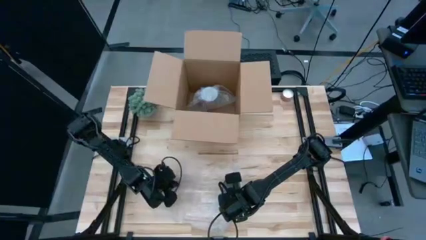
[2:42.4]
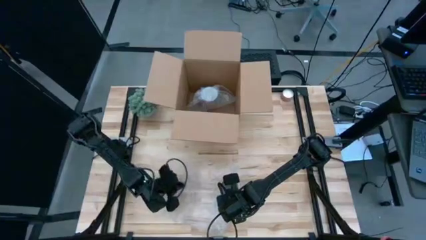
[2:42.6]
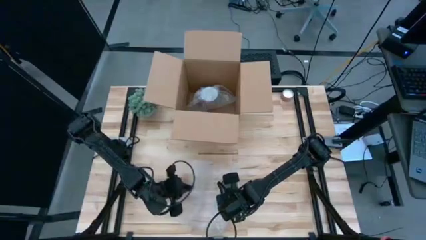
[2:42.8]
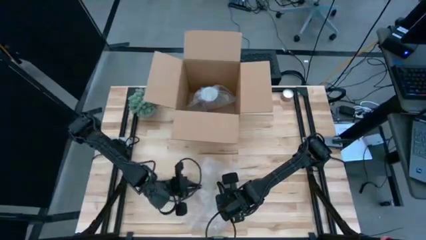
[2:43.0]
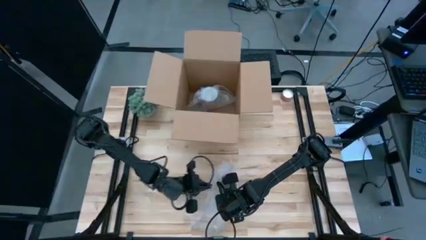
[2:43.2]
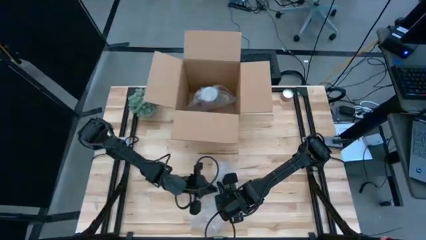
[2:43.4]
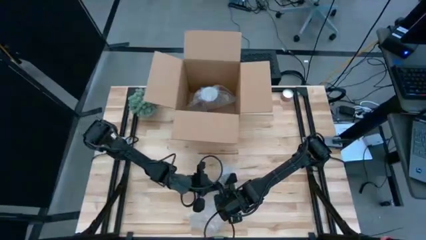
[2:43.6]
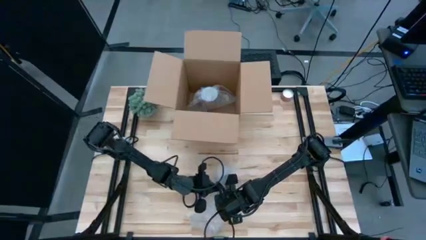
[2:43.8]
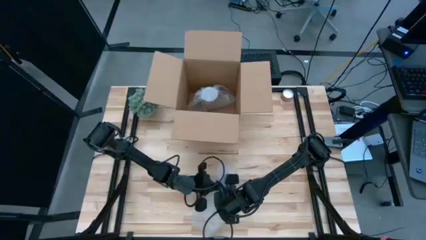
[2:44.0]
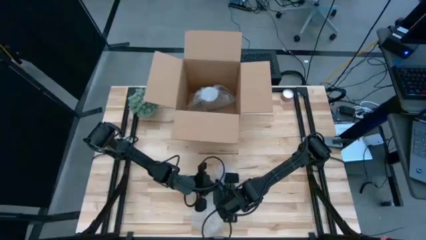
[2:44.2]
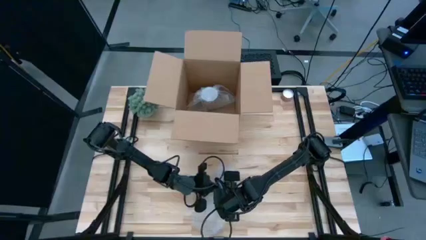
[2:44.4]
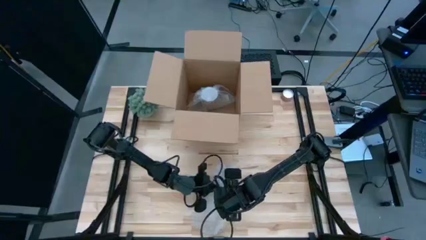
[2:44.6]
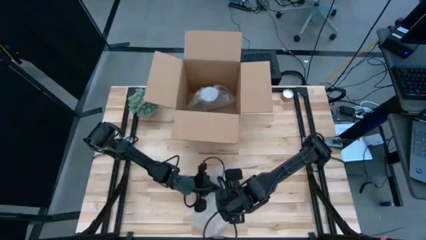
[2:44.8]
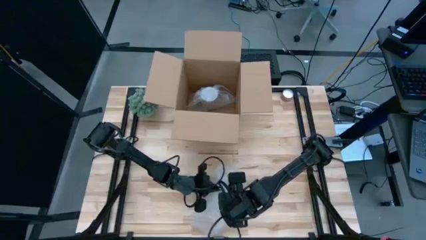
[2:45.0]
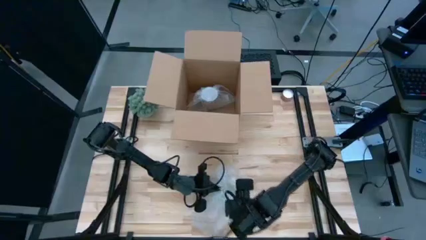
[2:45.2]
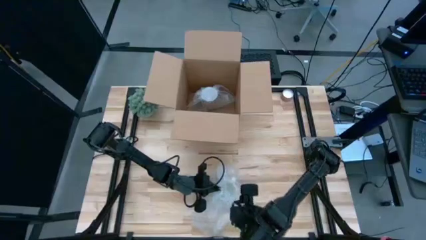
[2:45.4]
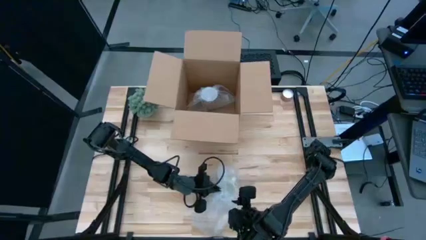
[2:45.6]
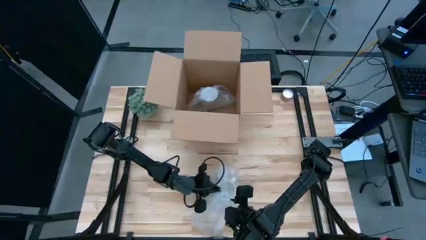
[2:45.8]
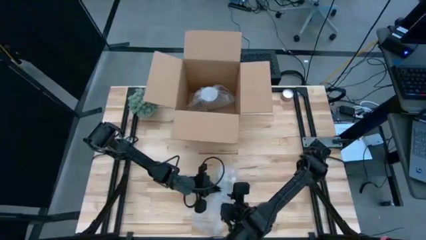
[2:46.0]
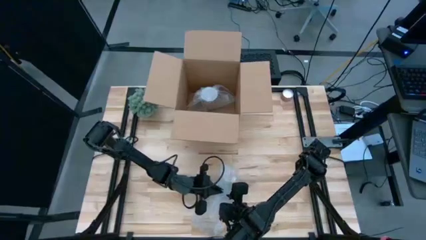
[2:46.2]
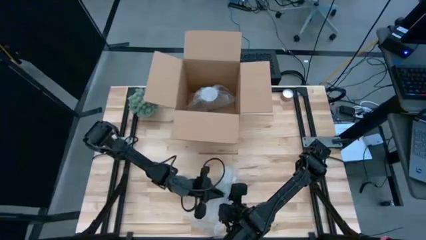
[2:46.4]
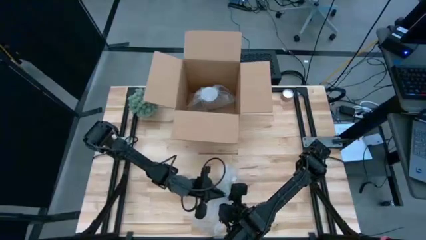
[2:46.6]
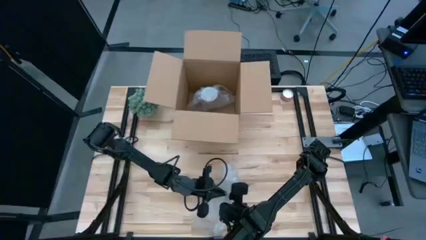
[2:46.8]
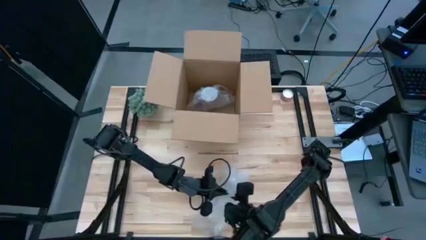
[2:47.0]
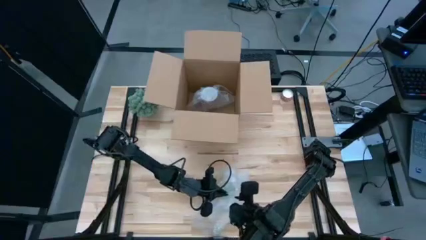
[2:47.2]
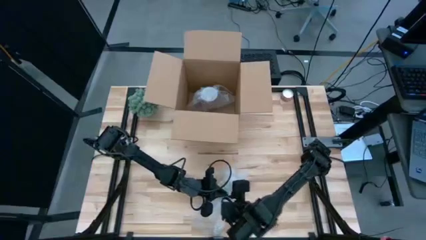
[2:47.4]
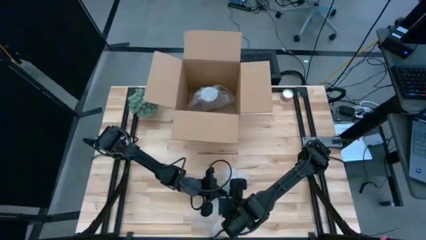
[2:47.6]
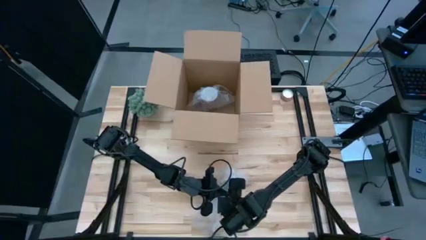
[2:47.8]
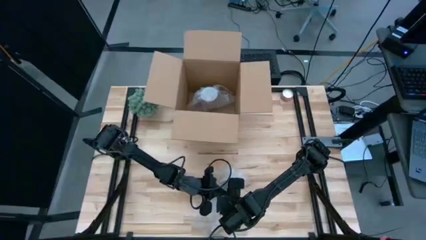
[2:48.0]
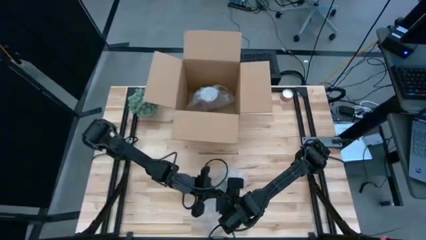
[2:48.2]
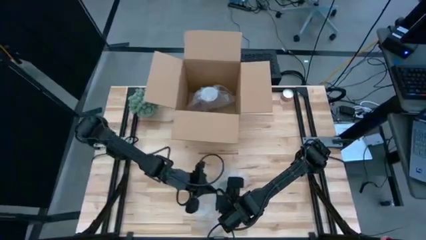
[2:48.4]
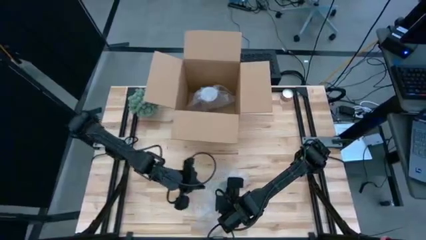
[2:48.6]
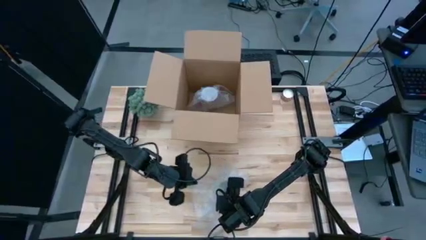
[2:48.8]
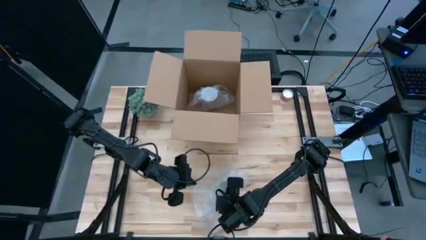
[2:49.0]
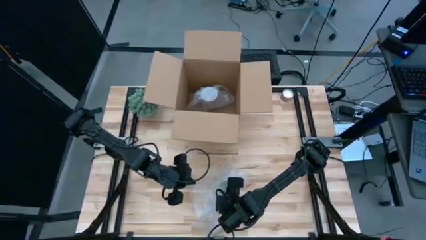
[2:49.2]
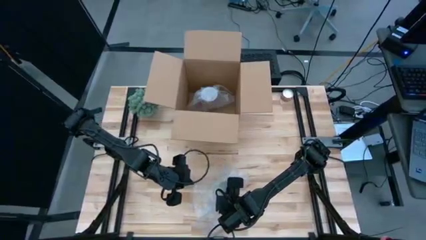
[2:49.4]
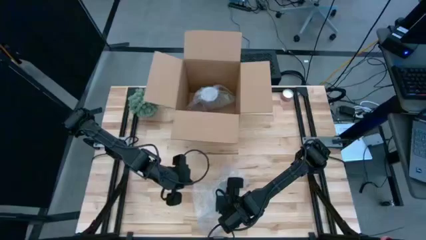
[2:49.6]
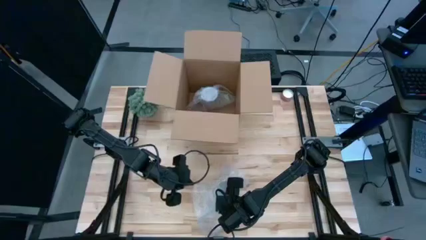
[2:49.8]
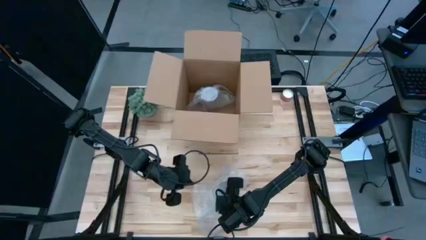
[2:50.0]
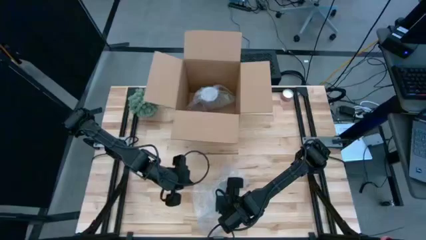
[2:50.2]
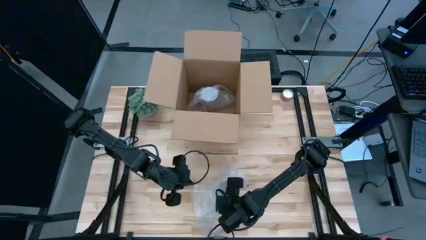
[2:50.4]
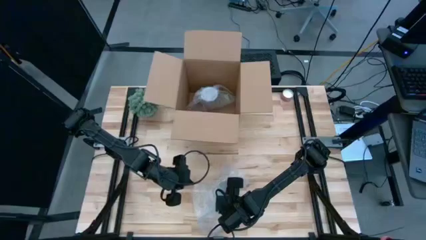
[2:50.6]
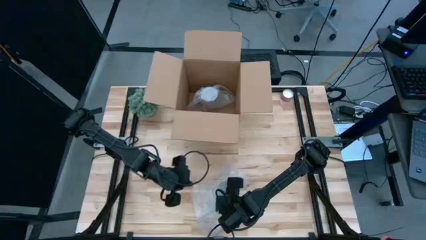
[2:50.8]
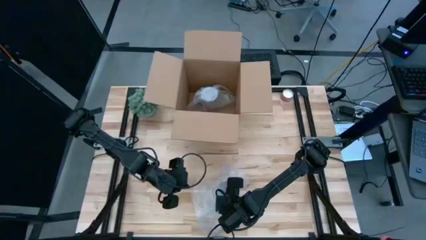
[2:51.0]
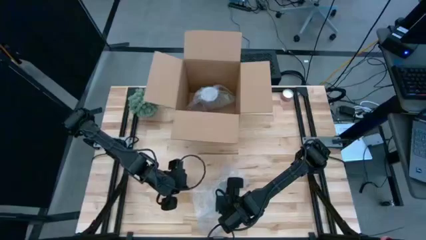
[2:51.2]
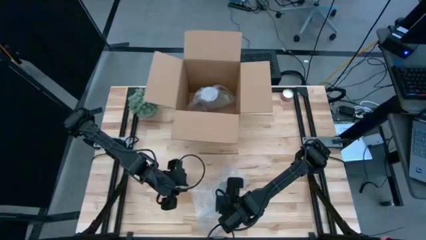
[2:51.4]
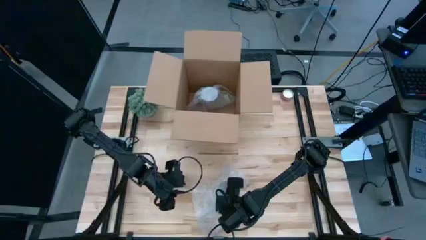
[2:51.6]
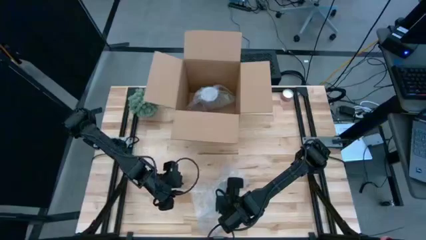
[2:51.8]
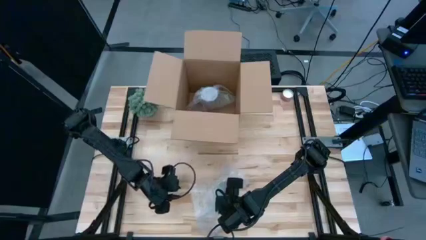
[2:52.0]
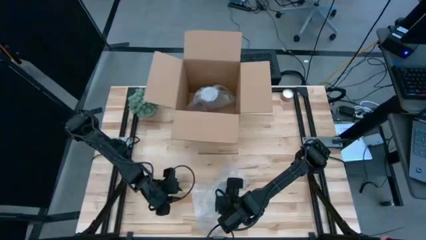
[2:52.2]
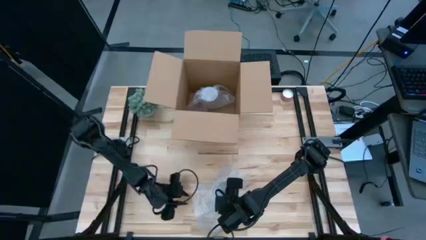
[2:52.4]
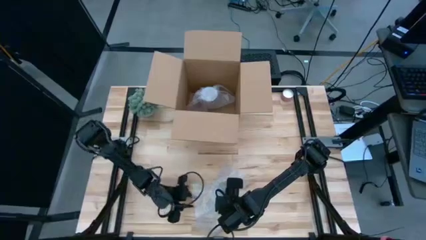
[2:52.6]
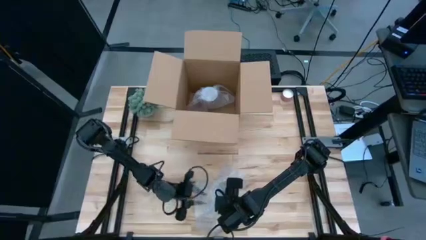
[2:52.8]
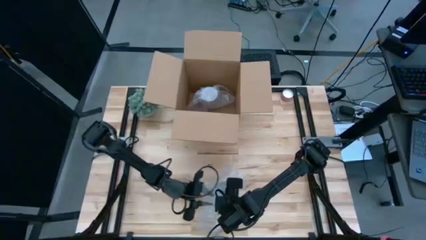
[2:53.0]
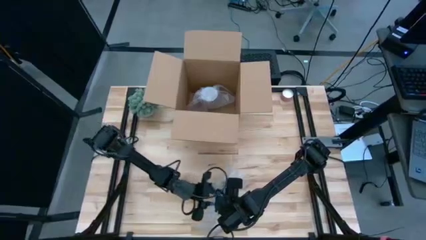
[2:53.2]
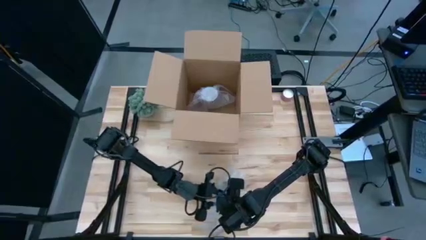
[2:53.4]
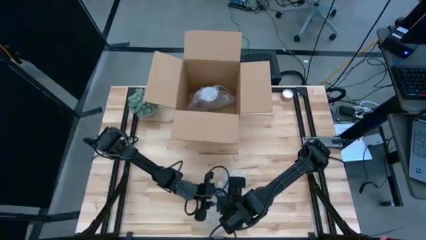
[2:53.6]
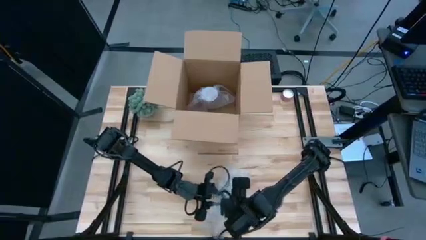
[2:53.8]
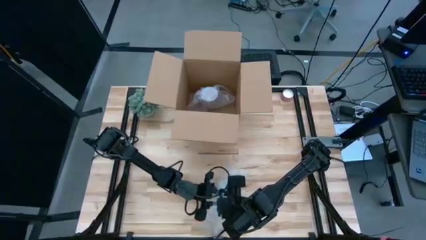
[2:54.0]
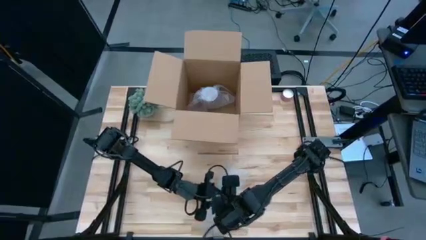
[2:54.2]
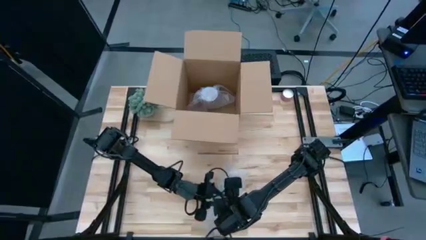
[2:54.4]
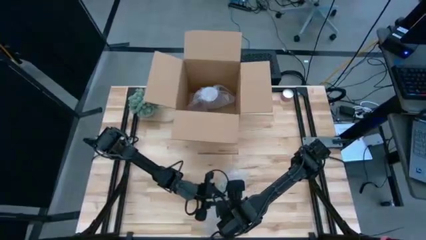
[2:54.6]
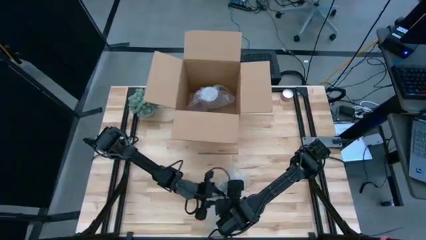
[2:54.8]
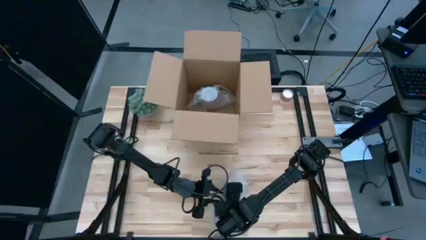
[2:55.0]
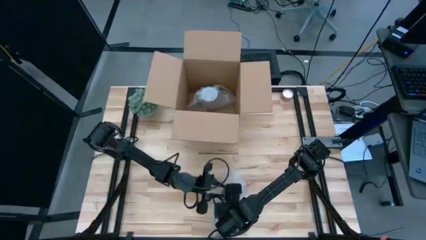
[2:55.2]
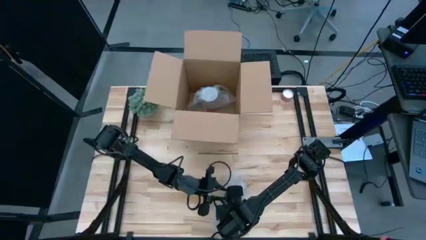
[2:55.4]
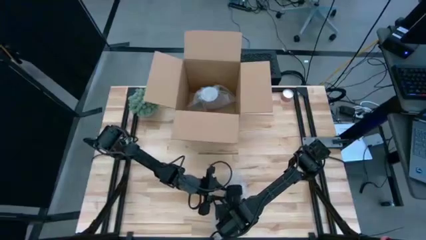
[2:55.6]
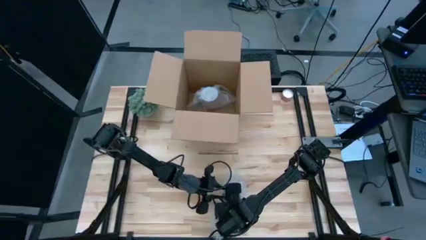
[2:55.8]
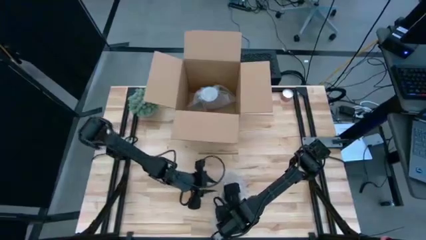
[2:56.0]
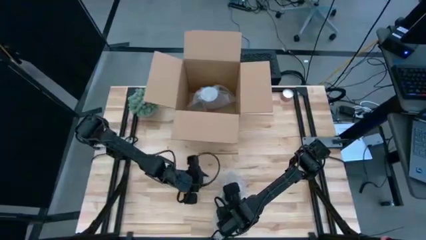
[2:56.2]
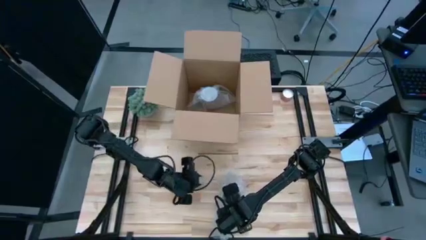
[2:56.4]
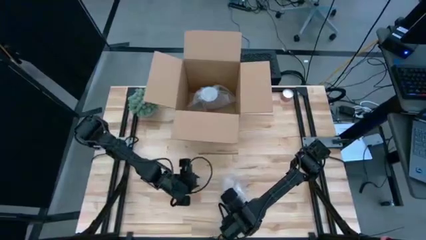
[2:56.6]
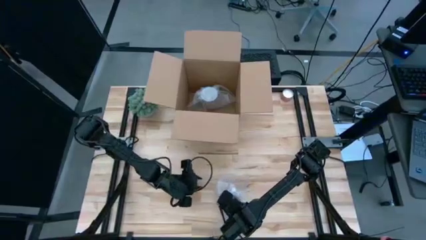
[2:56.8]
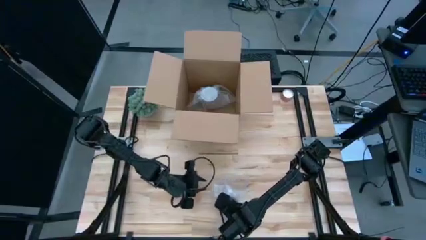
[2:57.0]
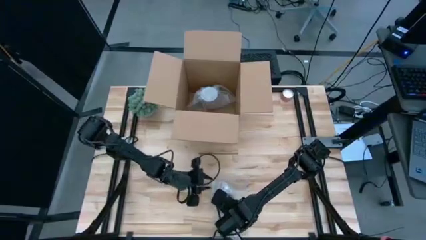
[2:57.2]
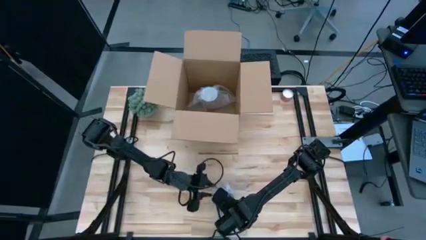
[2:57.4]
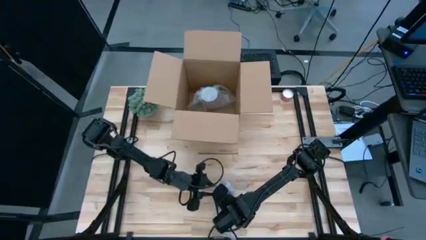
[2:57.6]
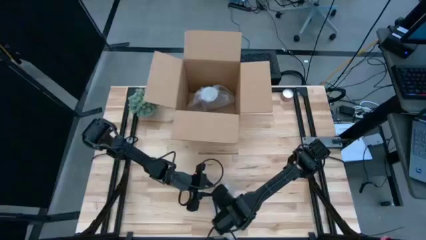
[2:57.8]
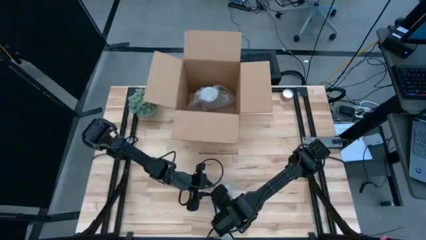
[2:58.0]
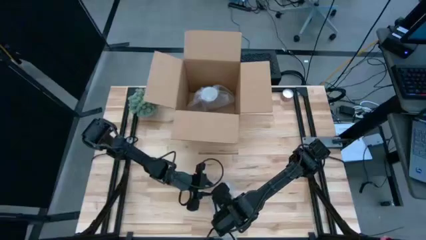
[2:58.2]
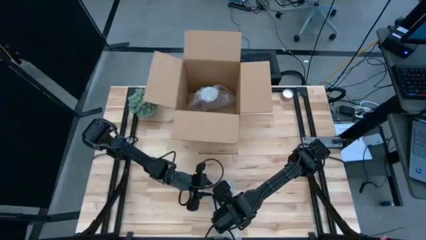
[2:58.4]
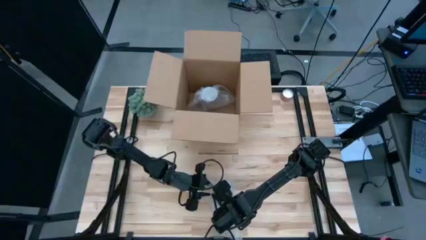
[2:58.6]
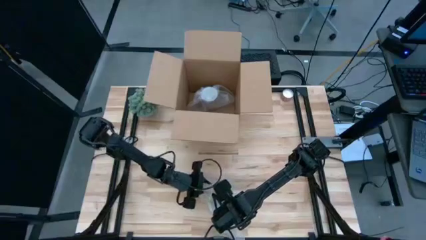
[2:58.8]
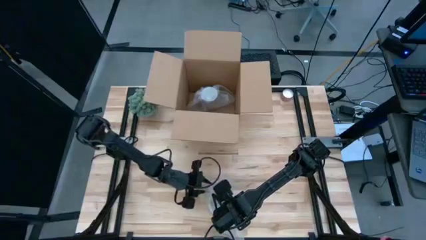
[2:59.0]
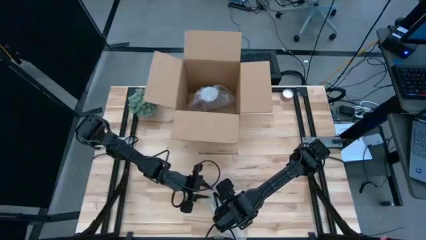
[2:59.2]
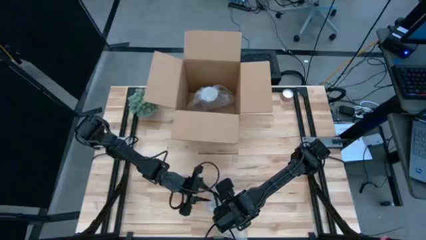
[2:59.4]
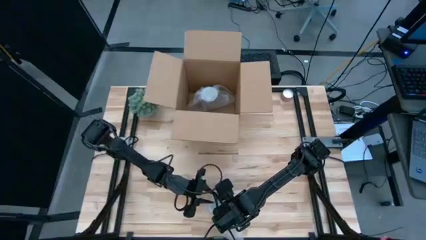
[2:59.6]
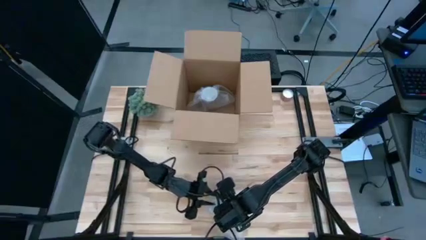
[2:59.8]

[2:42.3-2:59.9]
Task: wrap mug
Wrap the yellow patterned mug with bubble wrap
